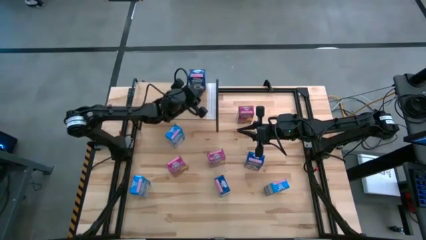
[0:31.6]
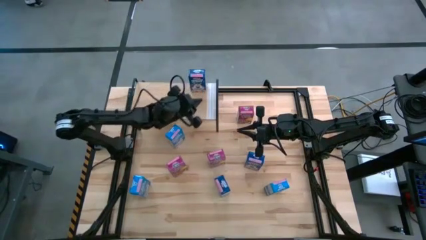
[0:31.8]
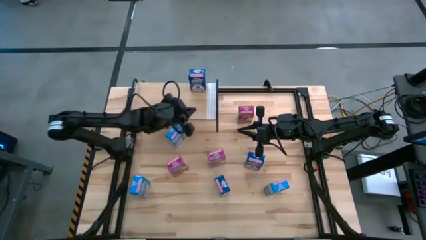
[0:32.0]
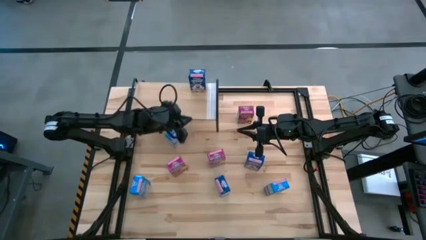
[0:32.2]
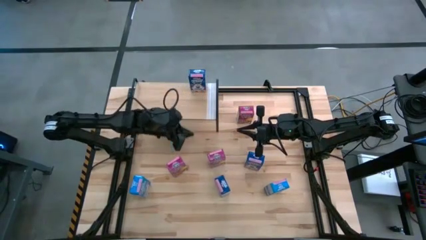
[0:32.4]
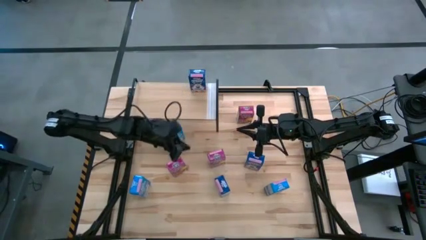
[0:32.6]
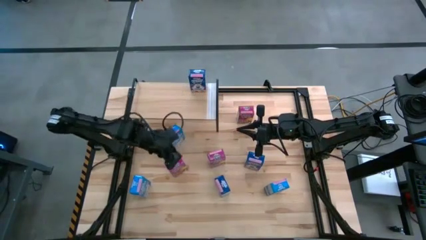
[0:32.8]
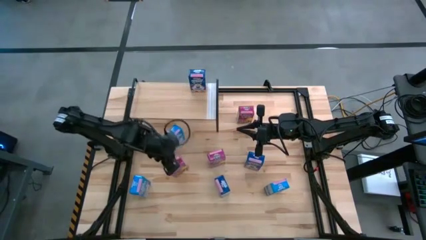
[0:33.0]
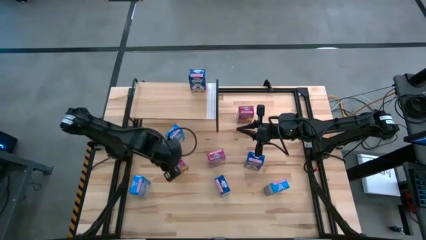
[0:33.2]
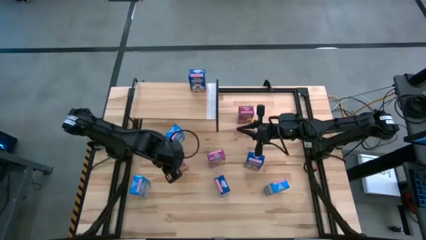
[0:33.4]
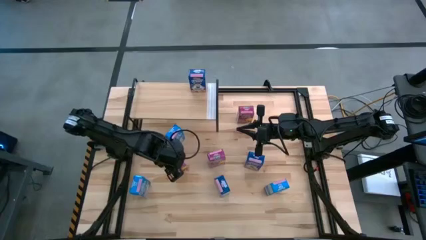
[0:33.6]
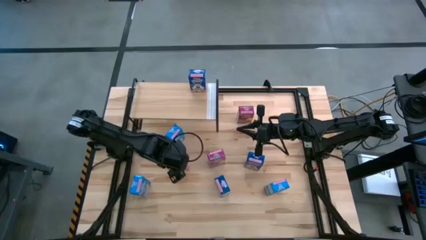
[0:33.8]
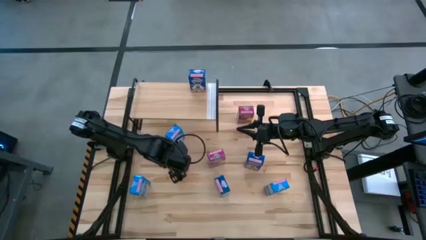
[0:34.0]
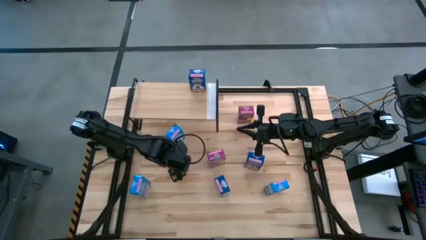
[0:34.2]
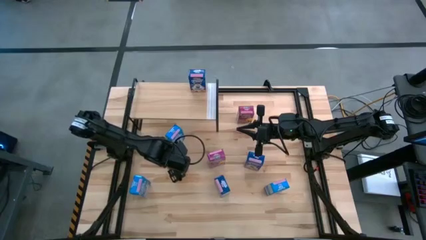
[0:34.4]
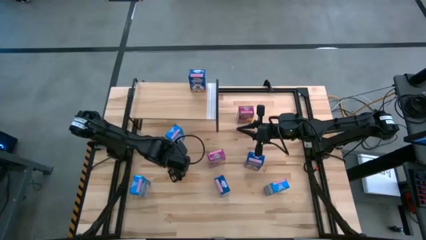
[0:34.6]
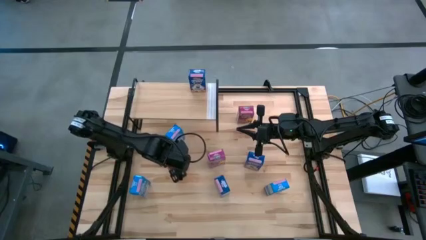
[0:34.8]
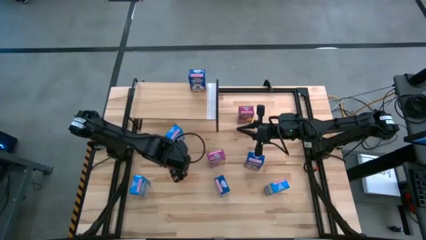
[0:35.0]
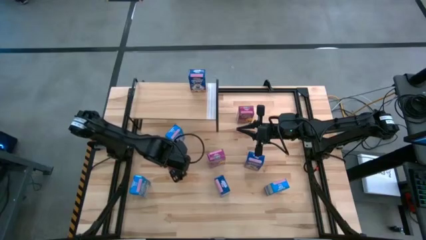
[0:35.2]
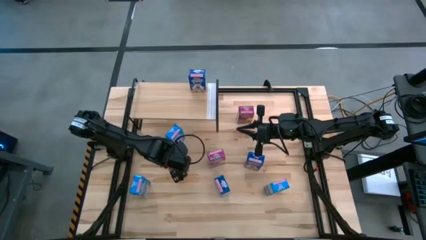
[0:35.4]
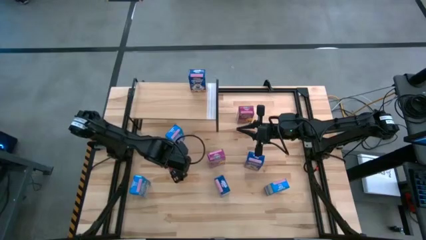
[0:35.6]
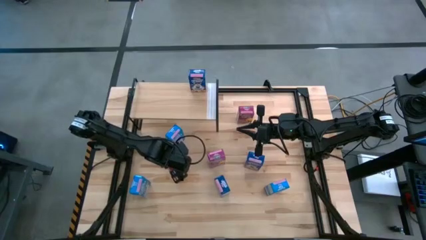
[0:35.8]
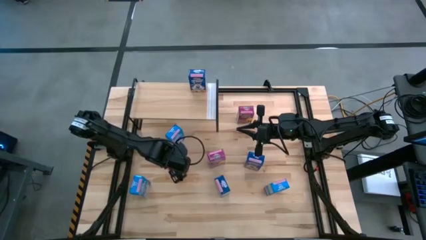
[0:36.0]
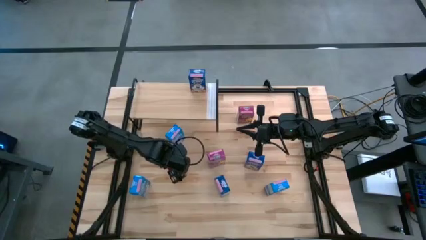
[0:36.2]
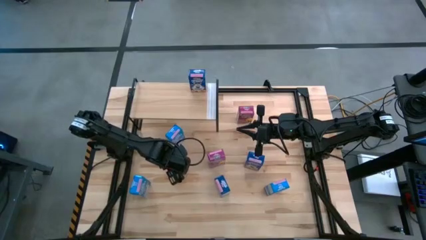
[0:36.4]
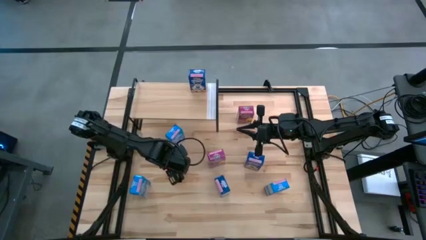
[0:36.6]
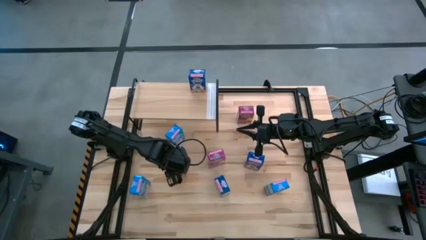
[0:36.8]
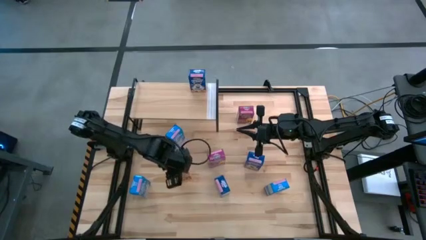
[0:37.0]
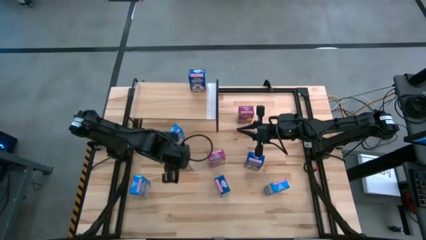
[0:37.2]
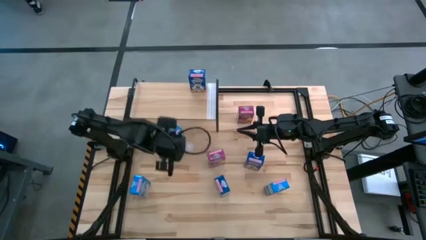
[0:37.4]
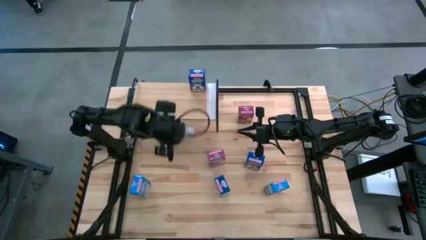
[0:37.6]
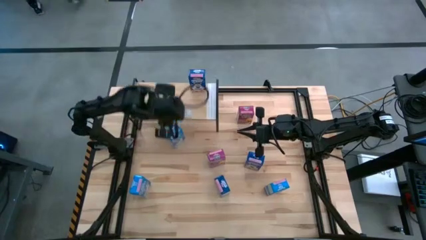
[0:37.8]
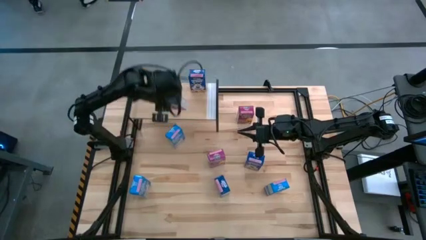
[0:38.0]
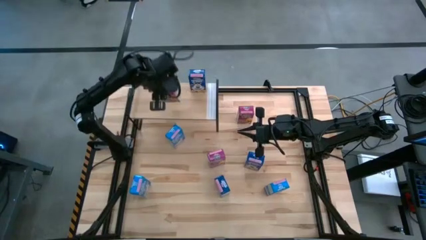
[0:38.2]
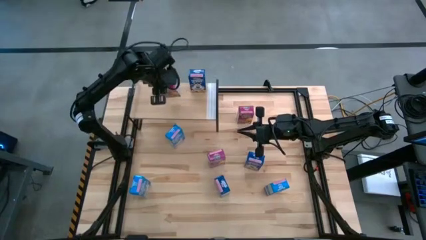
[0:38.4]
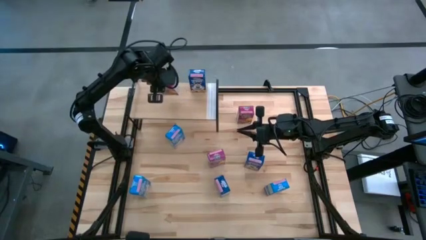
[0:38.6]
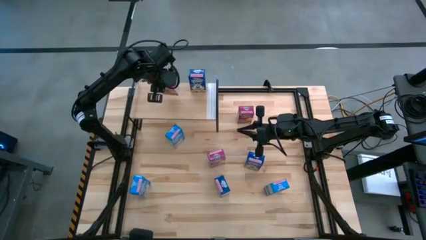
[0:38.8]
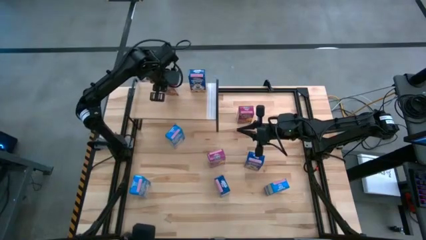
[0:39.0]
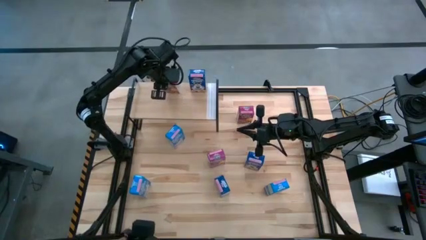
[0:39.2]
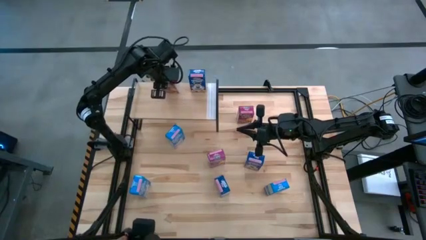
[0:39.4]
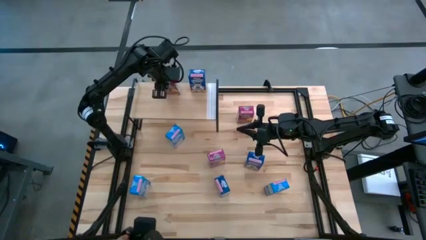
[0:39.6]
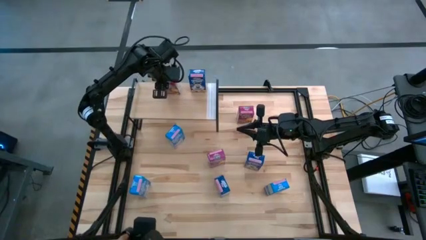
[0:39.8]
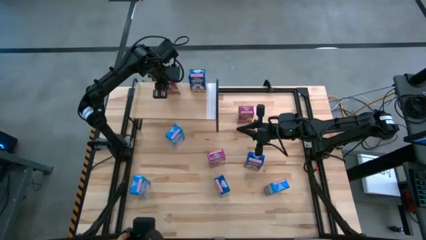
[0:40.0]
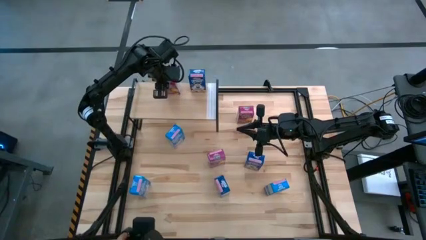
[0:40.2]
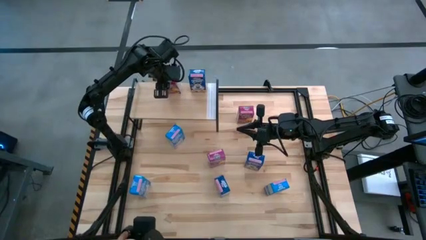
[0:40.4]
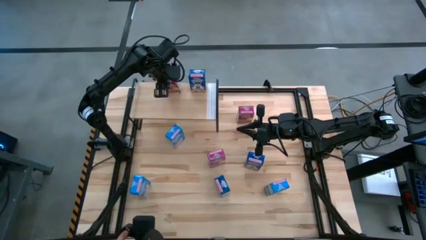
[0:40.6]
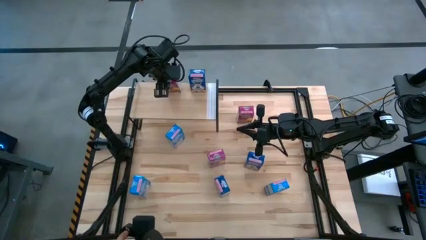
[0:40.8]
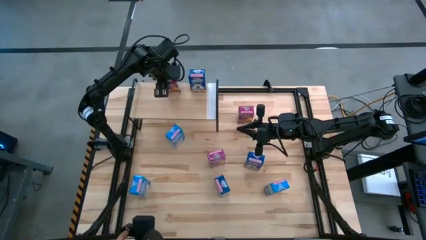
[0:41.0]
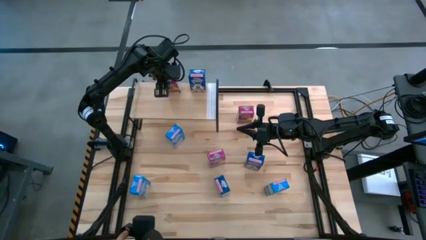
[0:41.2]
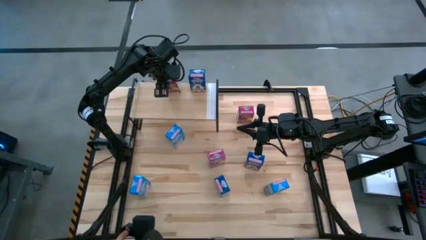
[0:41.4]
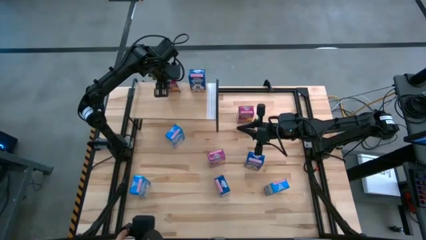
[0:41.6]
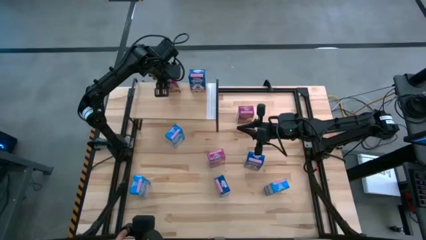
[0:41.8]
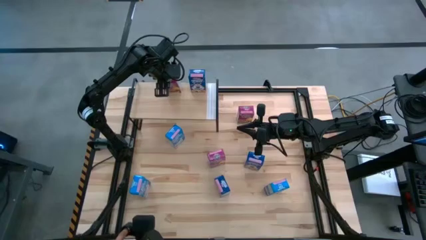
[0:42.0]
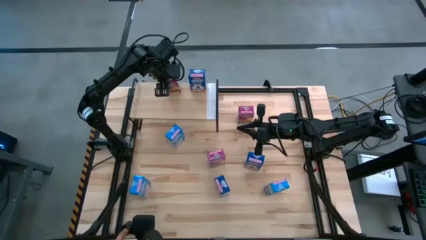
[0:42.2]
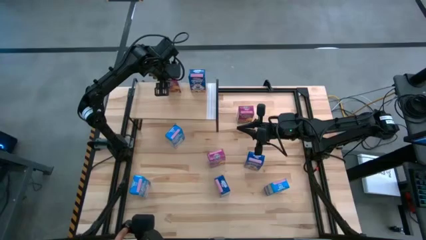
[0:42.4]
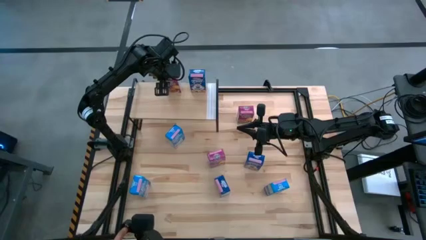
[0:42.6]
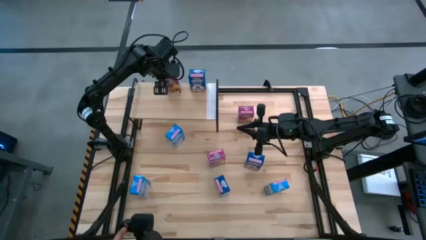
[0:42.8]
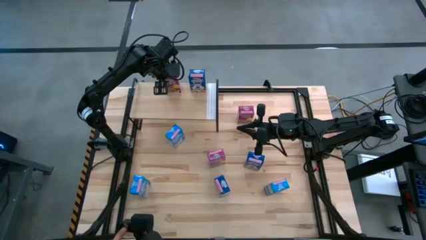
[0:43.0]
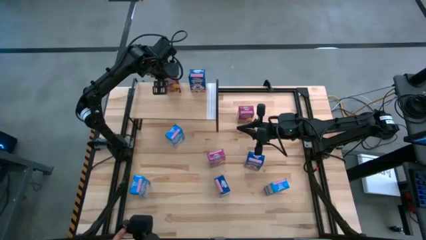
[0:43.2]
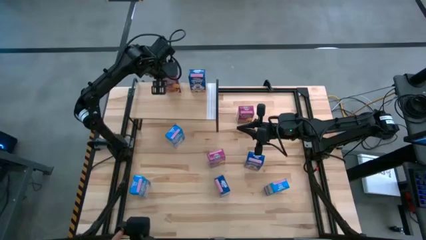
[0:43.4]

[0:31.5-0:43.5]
Task: Stack cereal on shelf
Put the bottom left pink cereal box on the shelf
